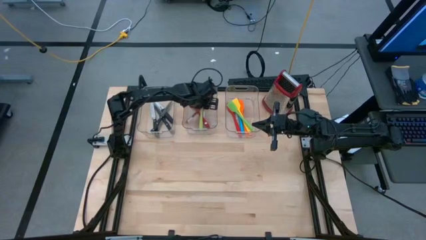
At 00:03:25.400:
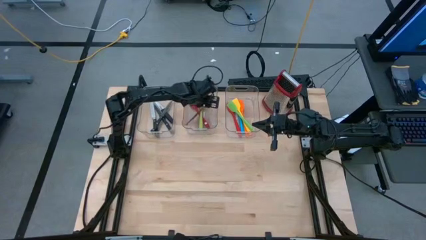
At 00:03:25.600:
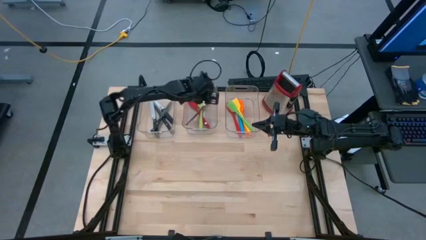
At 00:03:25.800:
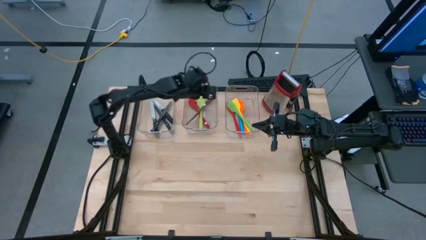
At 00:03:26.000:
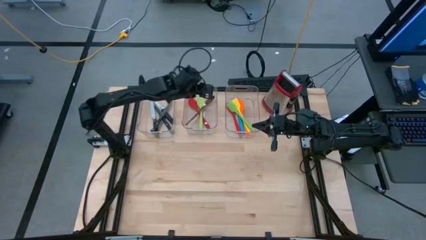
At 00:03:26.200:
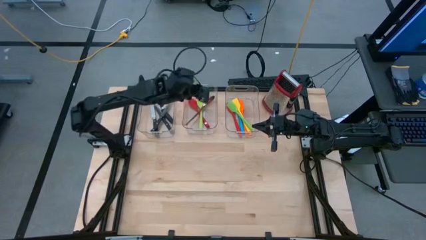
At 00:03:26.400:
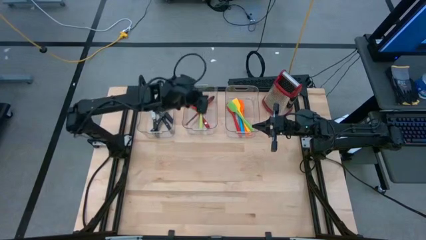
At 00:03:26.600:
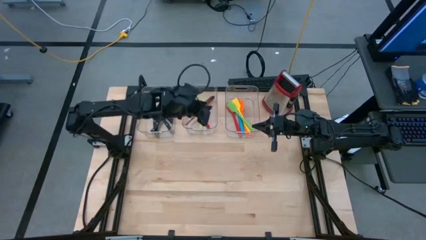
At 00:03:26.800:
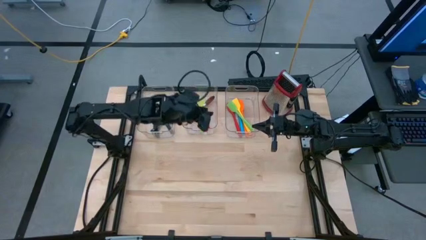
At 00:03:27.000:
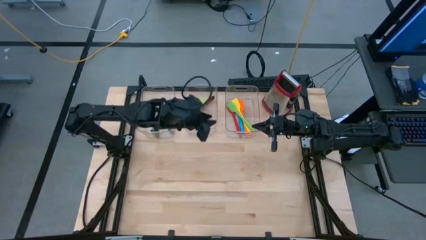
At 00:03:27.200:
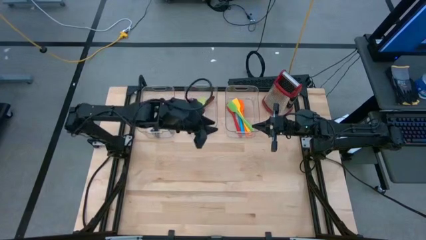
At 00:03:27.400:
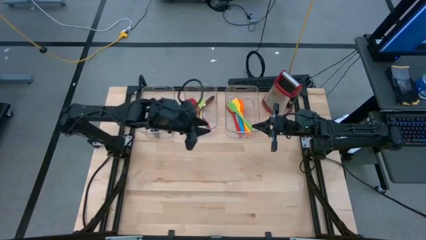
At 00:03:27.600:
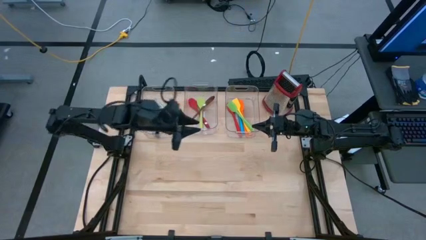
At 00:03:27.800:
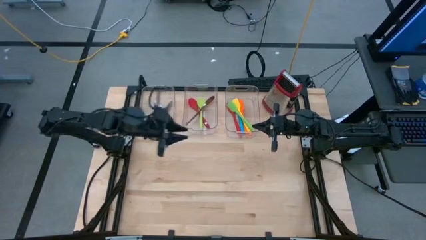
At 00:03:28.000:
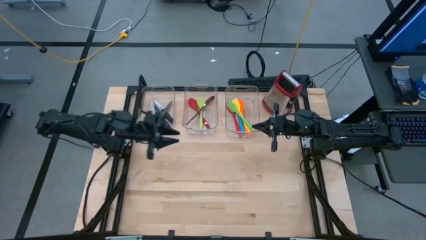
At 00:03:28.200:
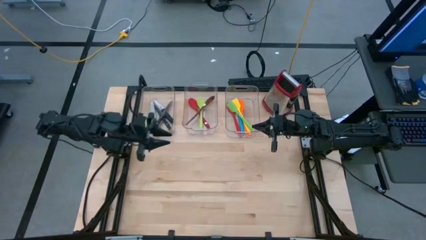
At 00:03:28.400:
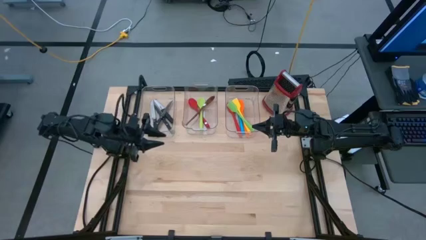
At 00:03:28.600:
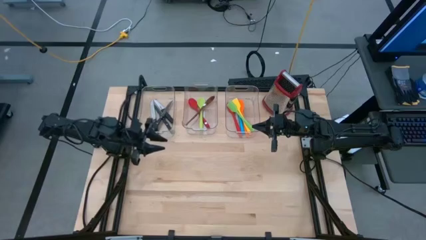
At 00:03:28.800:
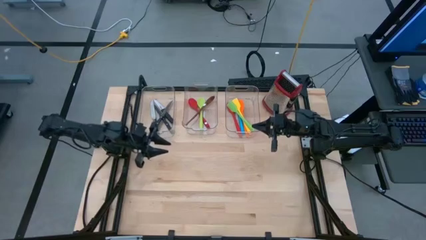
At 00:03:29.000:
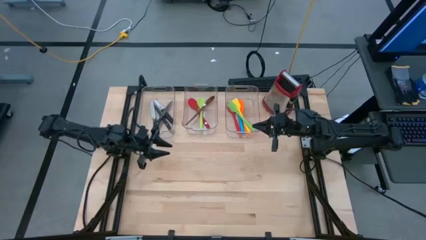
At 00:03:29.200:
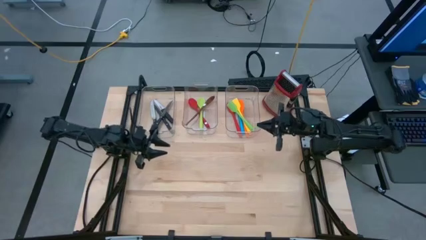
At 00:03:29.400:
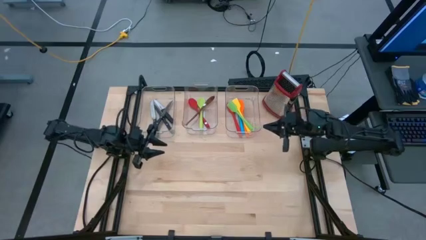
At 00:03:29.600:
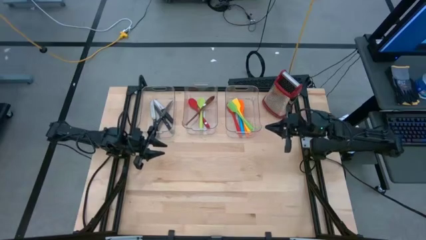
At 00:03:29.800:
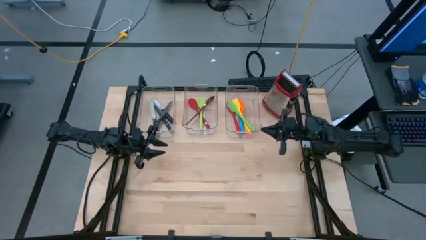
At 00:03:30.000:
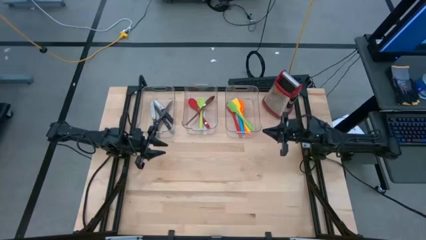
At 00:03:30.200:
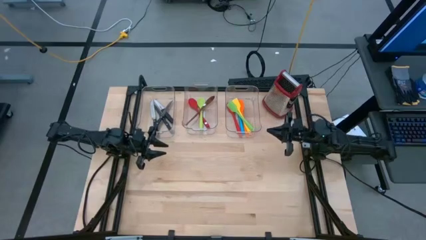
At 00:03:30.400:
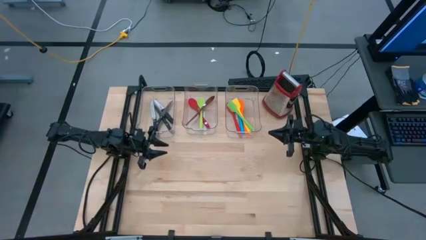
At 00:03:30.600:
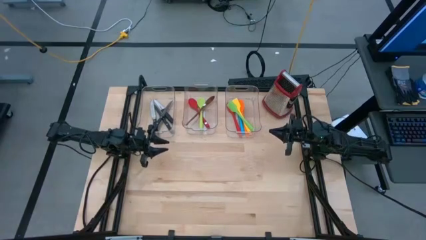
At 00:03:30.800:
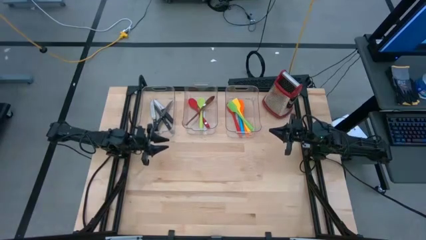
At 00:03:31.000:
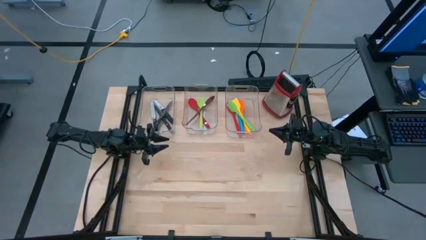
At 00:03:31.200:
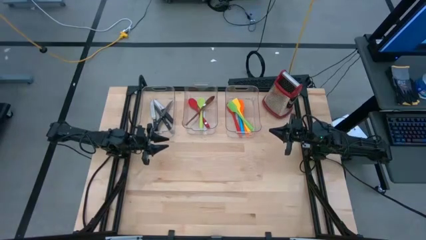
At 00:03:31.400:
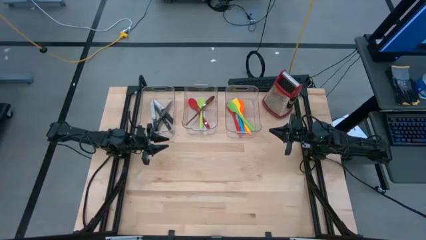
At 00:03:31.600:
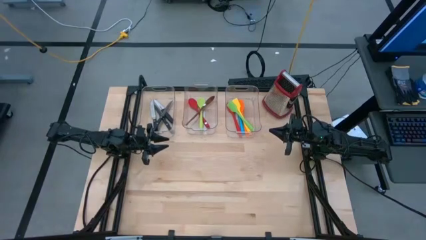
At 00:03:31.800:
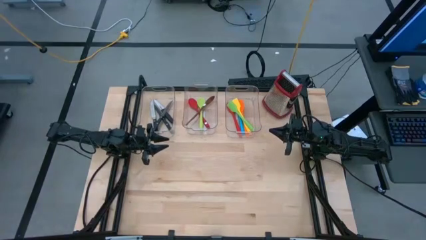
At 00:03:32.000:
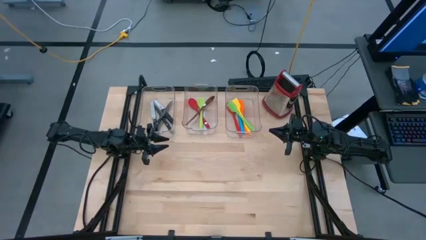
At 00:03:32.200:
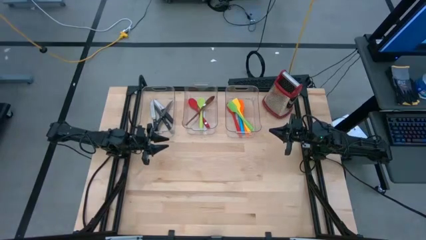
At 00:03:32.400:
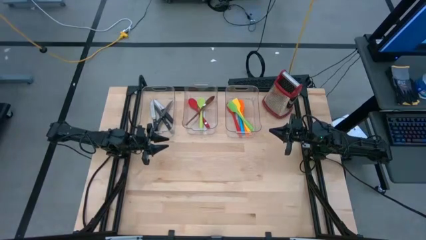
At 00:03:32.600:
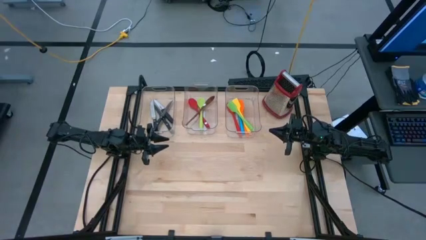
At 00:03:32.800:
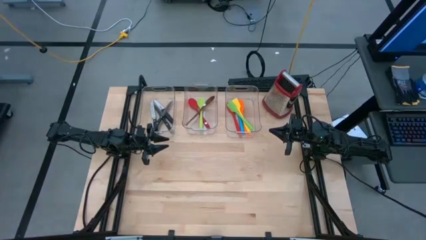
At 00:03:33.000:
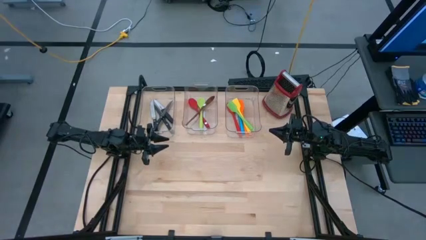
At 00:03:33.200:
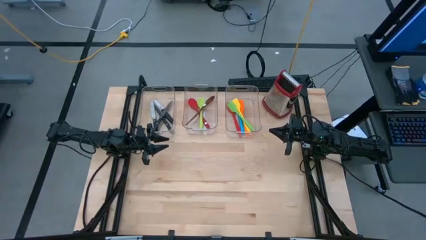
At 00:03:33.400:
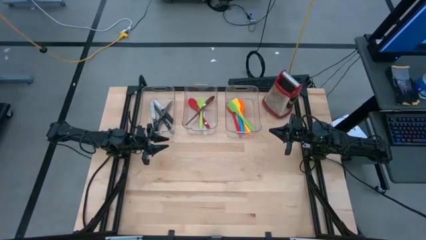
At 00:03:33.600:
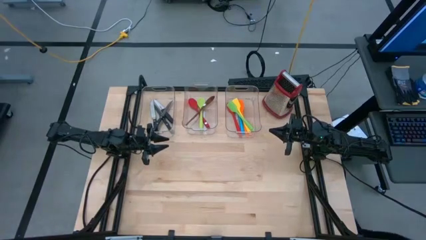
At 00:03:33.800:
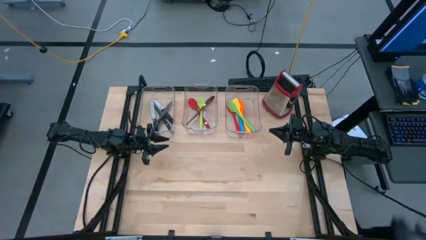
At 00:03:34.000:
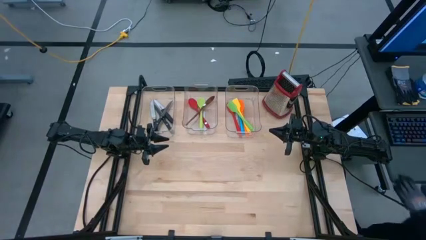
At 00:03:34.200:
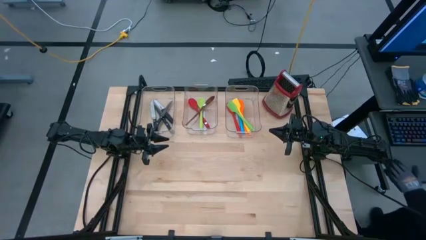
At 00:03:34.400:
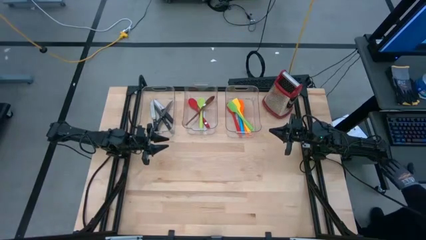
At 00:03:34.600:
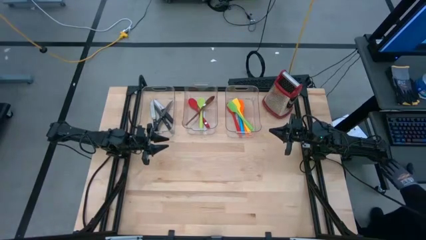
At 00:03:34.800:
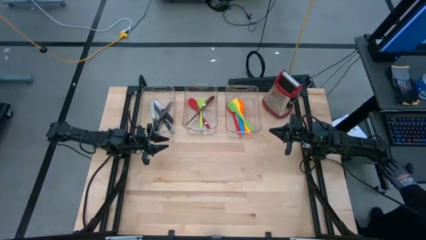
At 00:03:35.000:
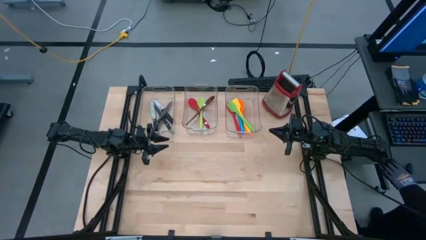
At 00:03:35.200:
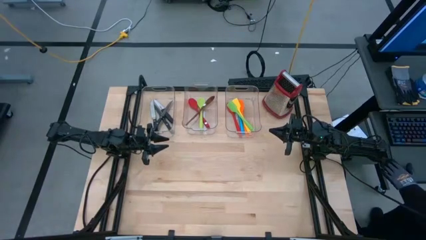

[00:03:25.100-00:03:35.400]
Task: Pick & Place Kitchen Items
Return to Home Position
